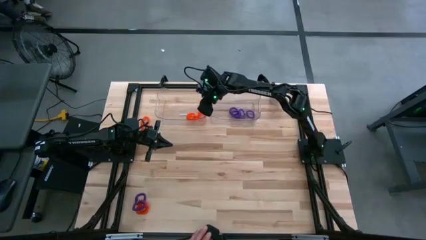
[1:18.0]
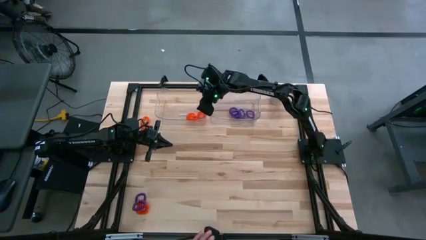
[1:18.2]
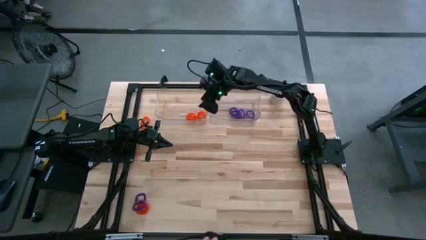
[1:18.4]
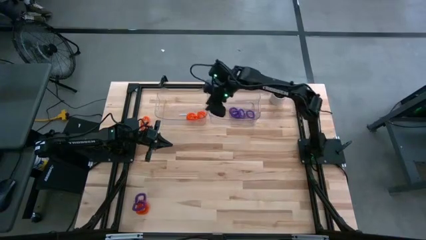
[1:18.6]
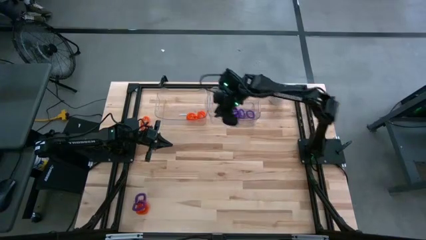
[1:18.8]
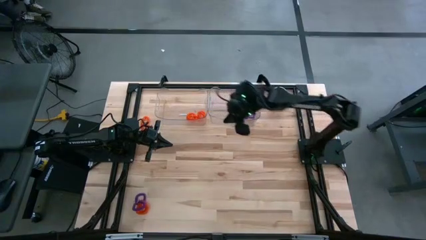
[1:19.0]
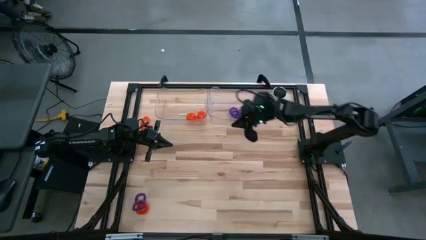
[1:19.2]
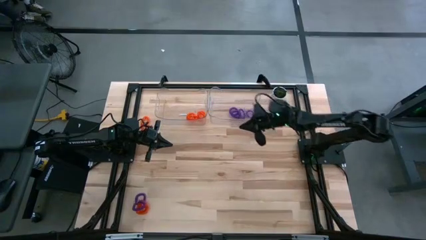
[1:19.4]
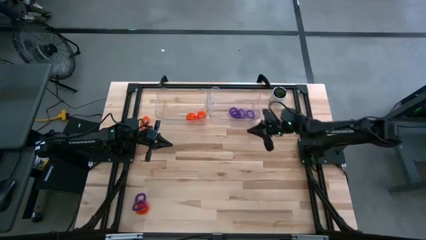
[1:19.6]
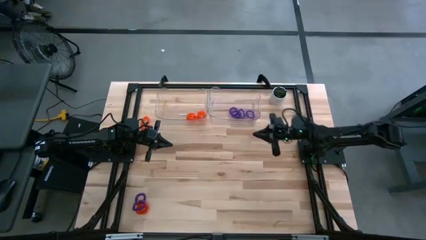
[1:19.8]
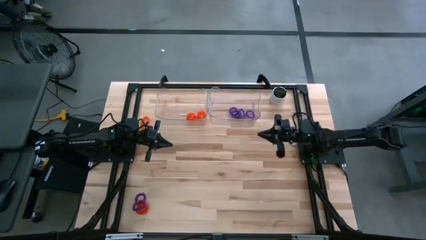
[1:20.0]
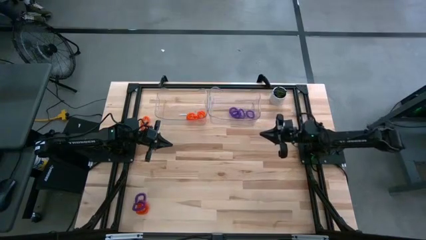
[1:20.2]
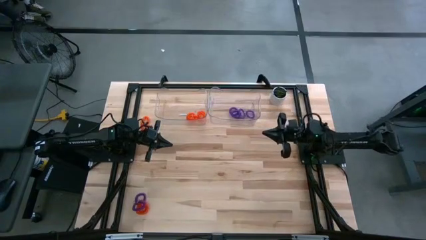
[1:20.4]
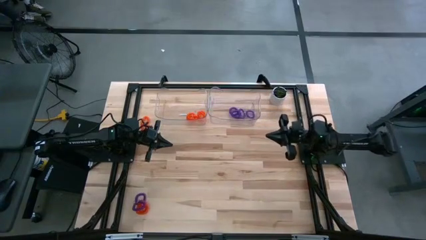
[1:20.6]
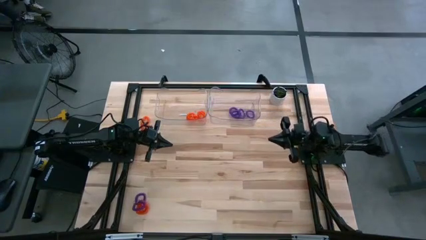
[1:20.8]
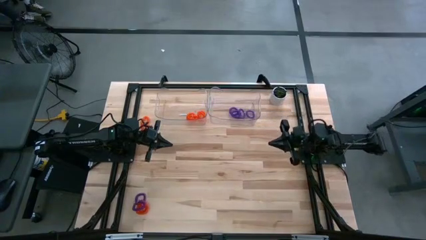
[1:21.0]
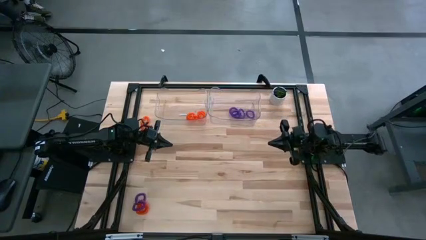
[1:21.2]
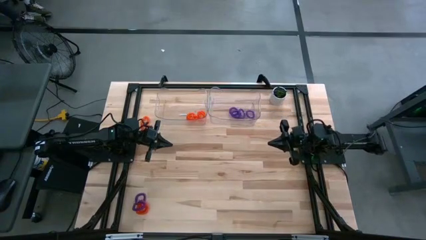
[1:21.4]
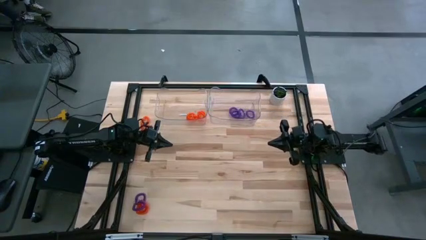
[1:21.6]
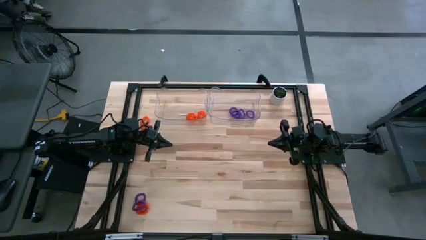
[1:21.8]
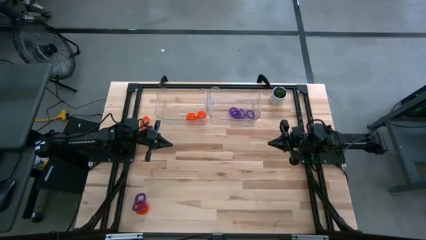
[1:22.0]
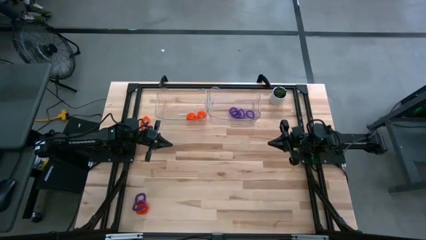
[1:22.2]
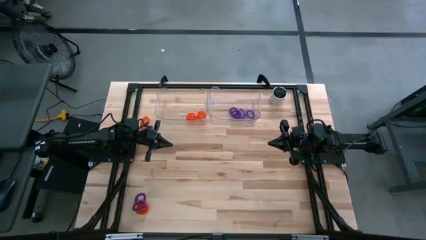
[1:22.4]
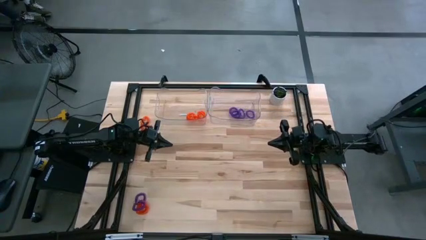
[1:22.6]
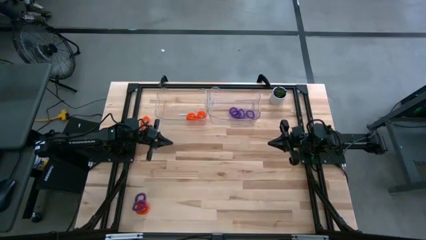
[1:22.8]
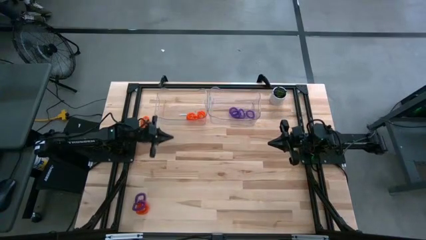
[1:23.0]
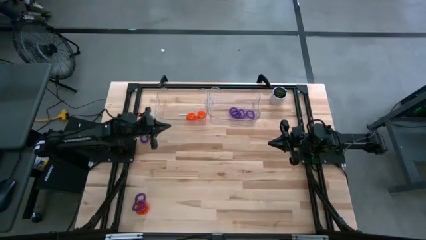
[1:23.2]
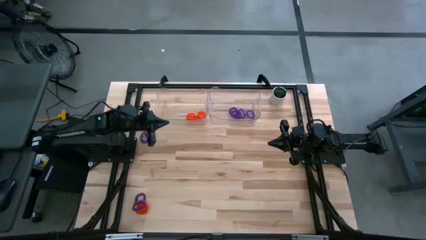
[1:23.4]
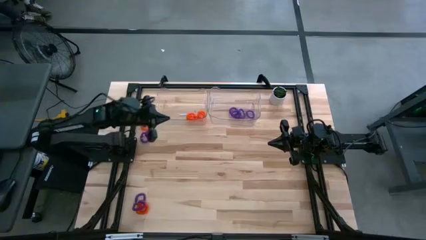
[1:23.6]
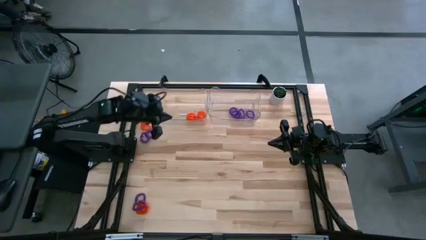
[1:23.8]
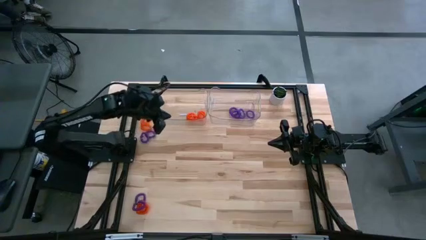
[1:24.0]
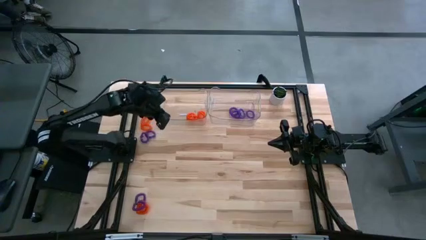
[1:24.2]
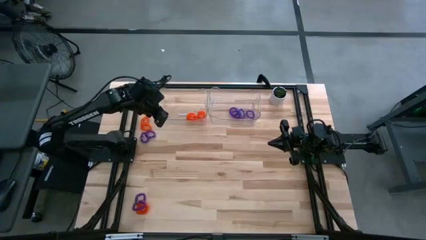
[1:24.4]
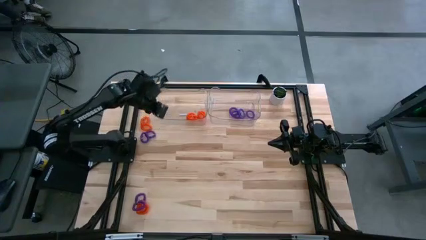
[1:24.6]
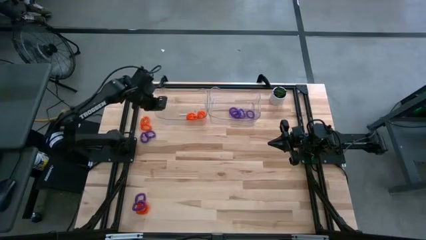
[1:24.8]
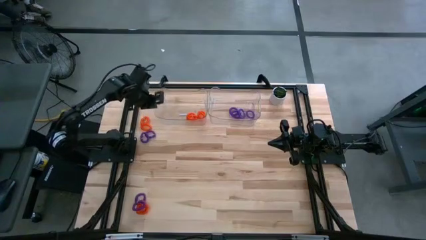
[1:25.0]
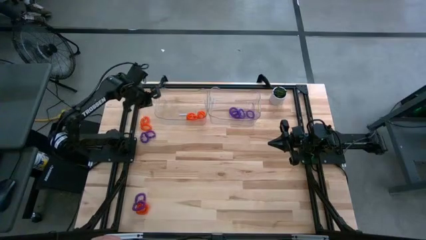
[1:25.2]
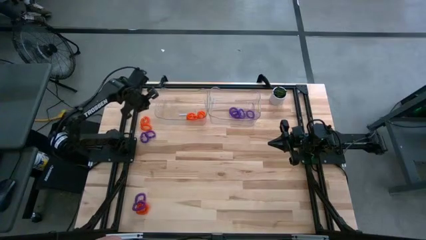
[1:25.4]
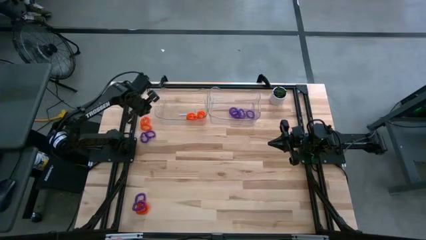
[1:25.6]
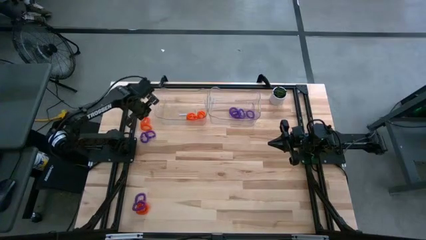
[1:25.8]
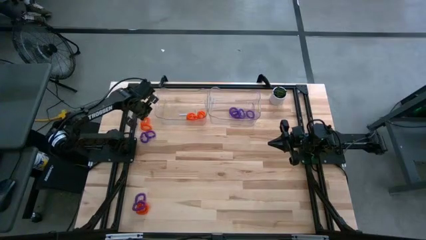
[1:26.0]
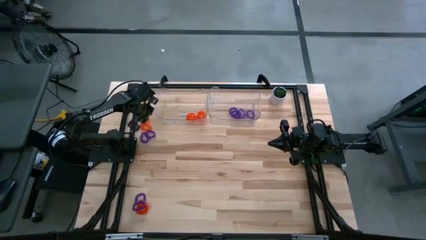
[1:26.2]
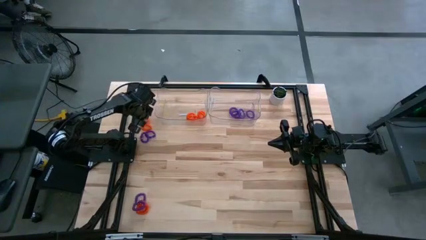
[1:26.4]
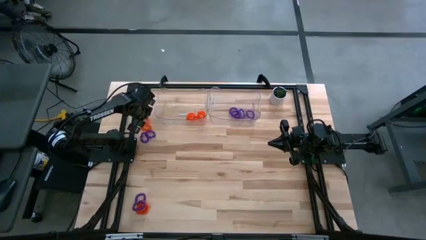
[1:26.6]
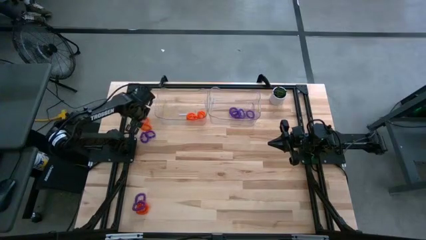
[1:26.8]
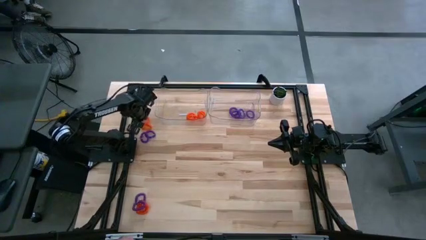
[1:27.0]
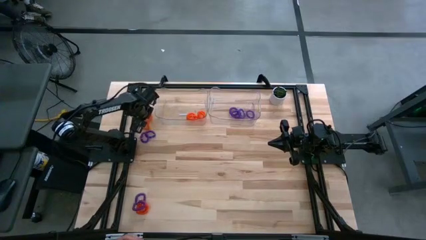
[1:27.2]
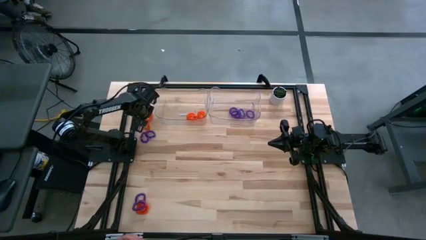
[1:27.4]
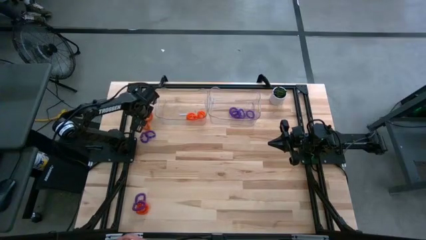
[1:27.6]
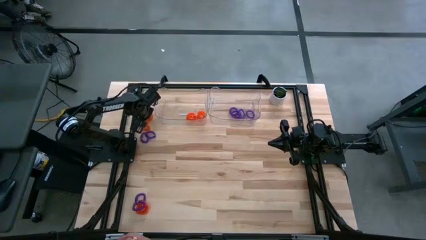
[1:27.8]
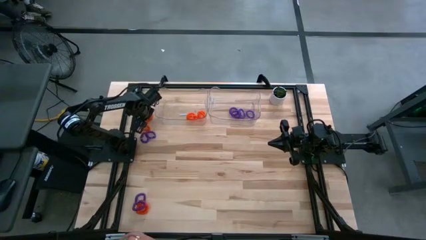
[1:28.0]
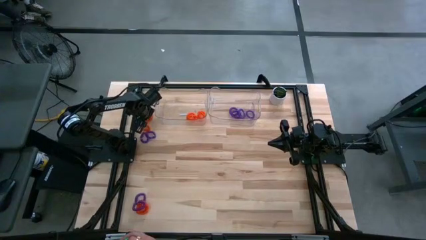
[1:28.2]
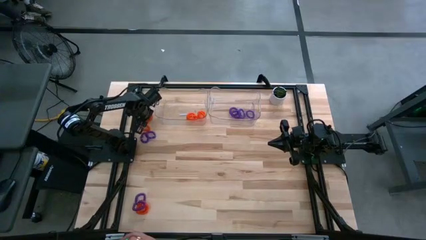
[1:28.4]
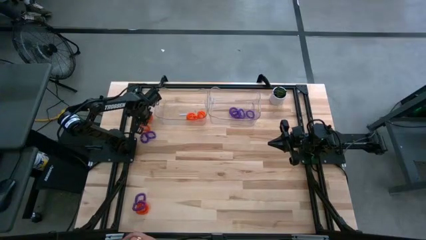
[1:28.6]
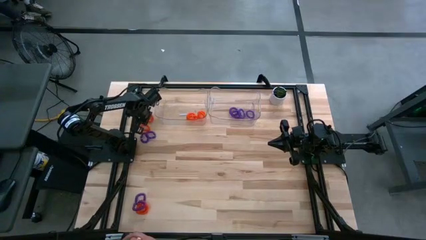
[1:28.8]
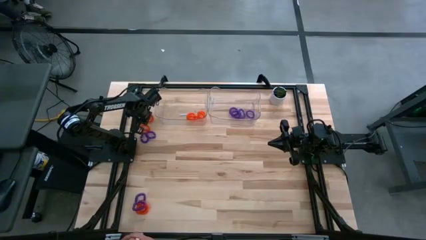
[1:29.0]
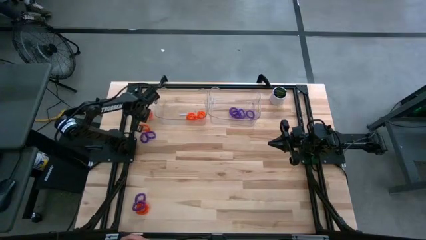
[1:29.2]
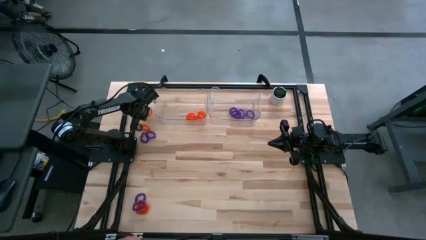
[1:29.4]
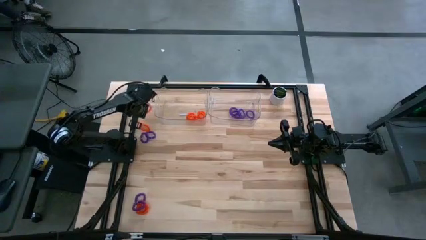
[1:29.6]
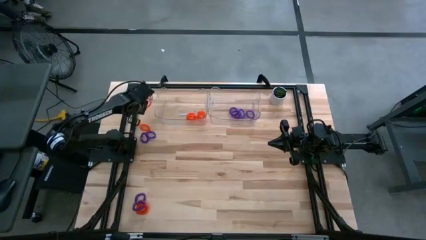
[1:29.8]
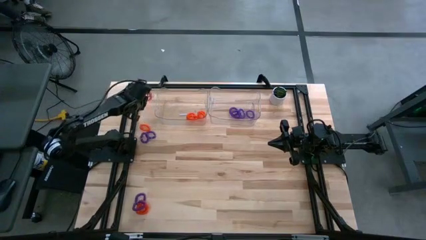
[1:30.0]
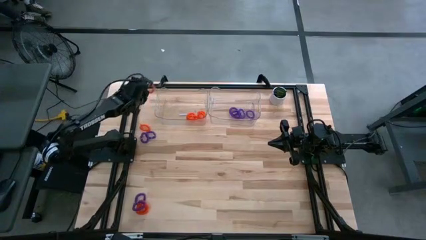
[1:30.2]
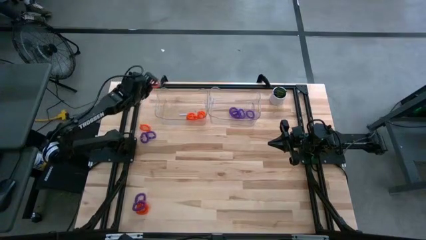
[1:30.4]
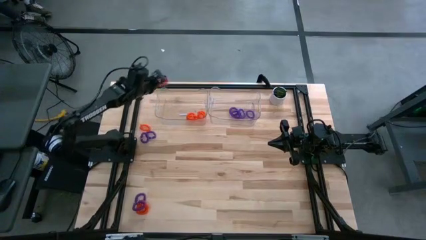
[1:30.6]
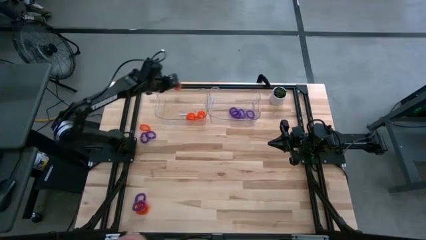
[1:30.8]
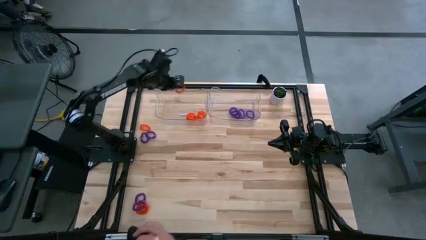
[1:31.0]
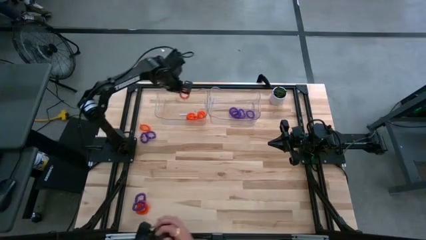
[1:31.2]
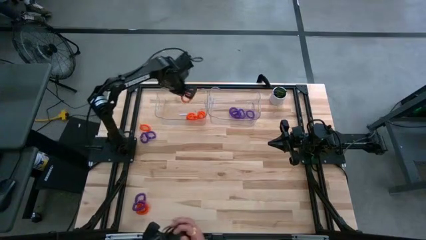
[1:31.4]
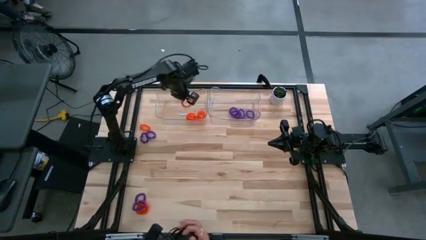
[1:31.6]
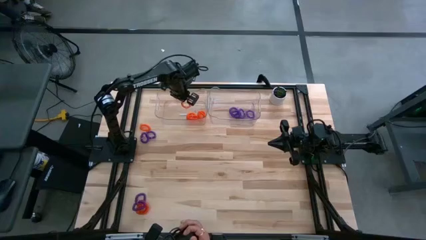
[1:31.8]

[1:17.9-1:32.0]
Task: Sort spring keychains
Put the orange spring keychain into the left transparent bin
